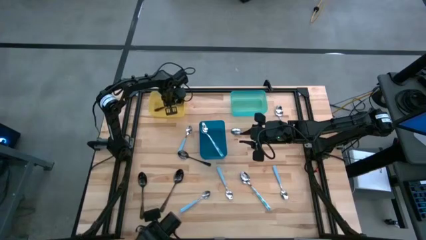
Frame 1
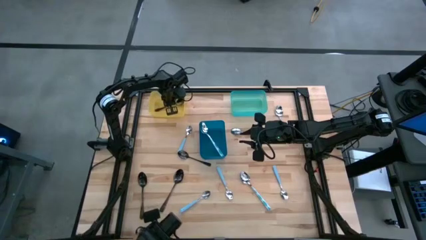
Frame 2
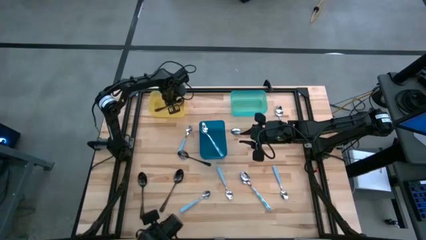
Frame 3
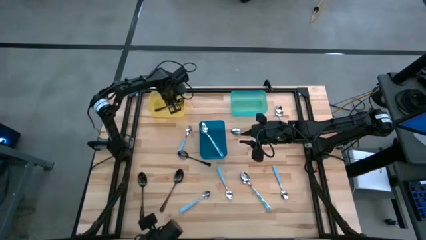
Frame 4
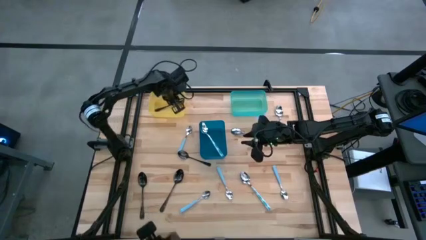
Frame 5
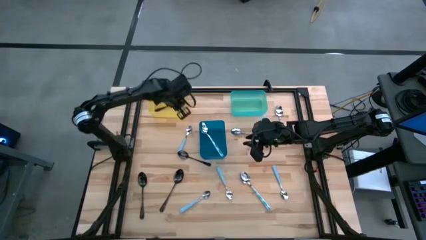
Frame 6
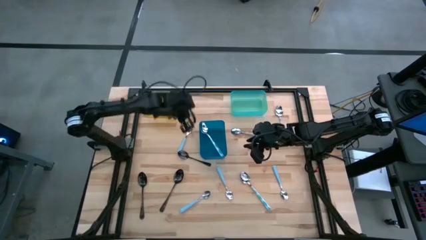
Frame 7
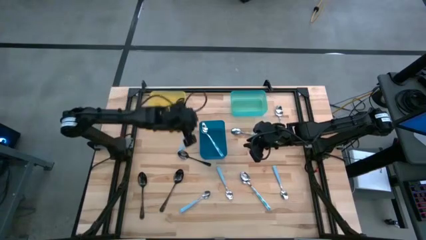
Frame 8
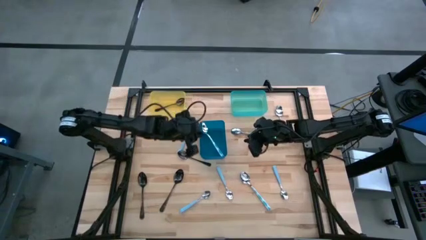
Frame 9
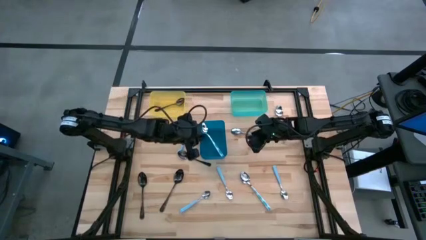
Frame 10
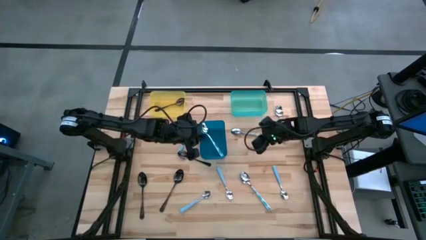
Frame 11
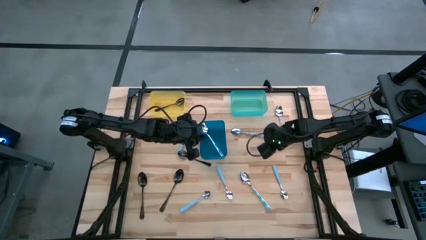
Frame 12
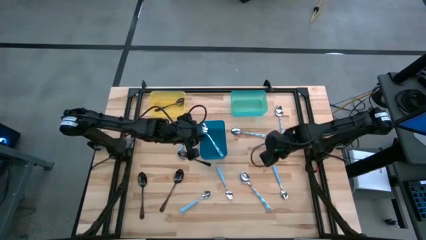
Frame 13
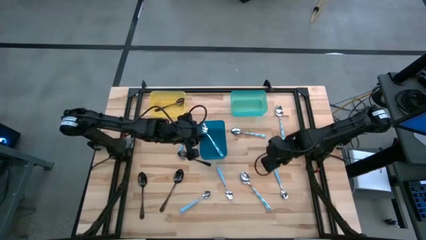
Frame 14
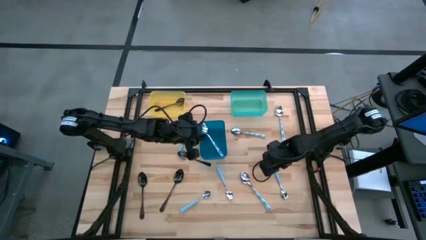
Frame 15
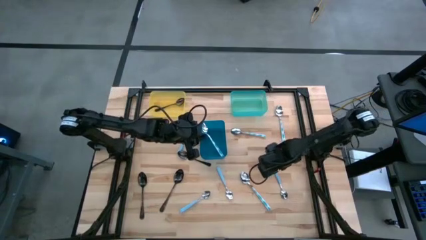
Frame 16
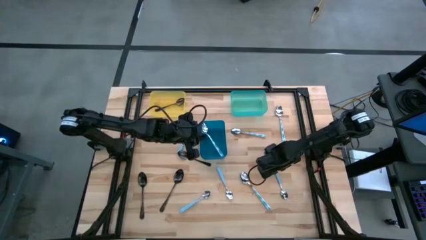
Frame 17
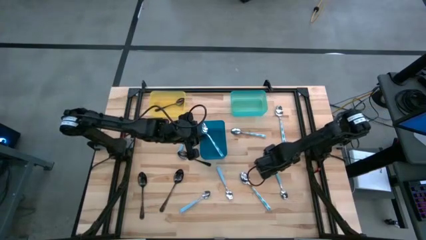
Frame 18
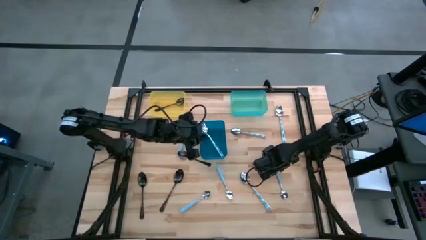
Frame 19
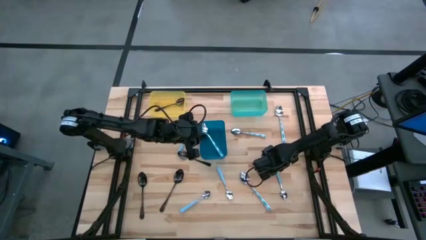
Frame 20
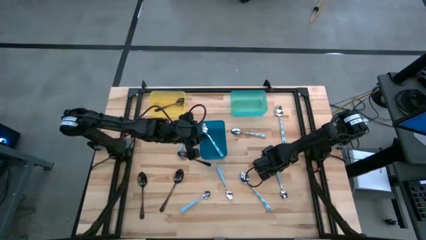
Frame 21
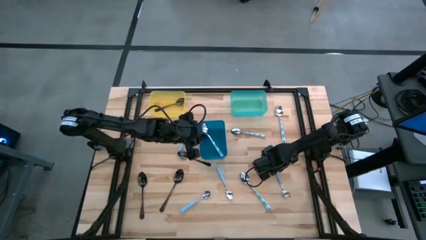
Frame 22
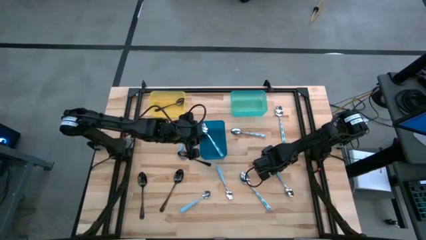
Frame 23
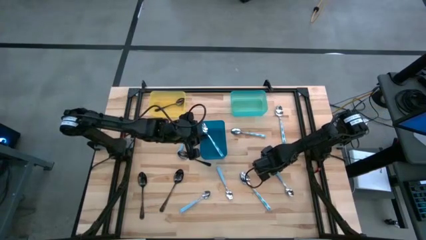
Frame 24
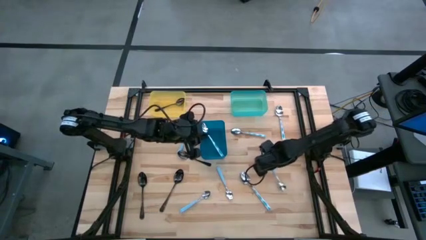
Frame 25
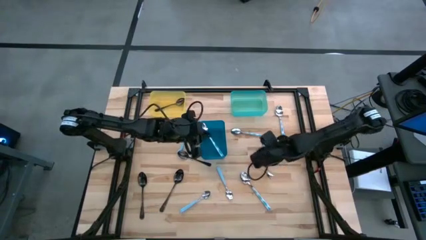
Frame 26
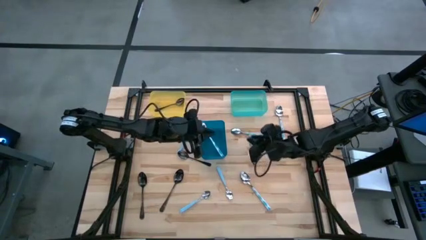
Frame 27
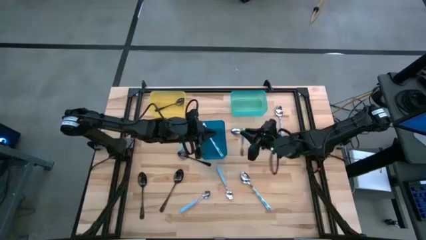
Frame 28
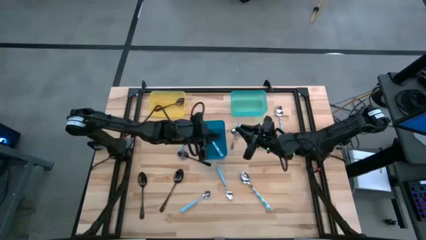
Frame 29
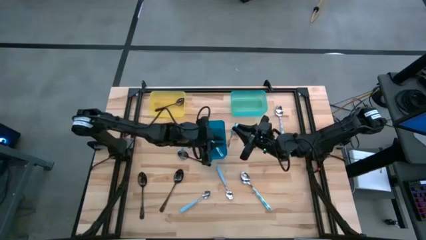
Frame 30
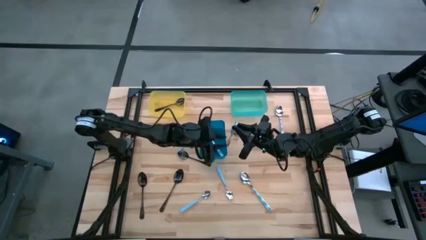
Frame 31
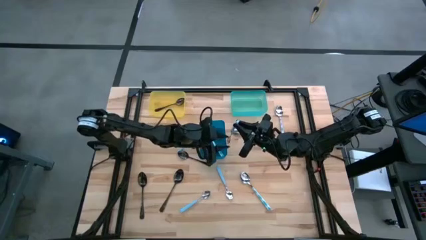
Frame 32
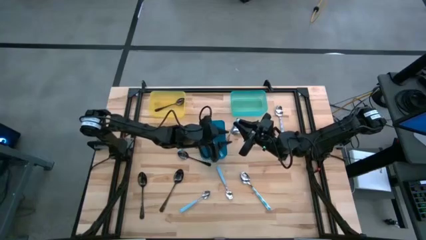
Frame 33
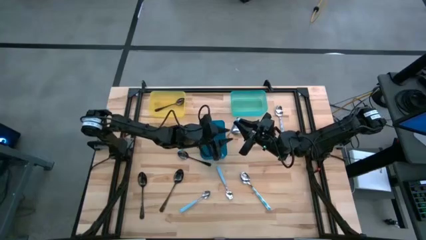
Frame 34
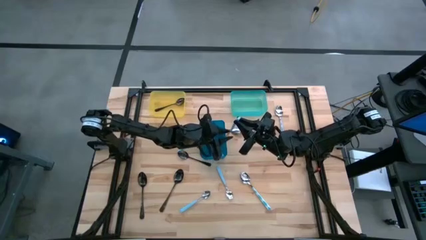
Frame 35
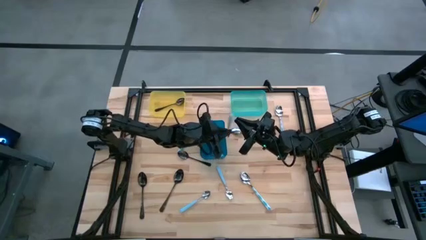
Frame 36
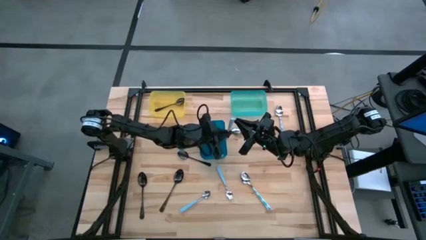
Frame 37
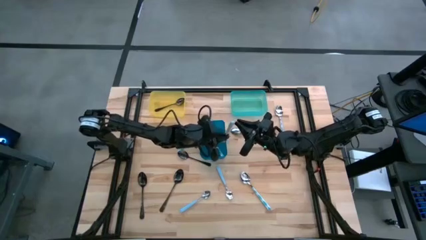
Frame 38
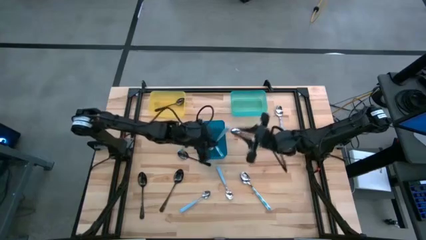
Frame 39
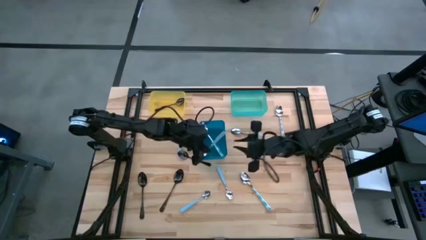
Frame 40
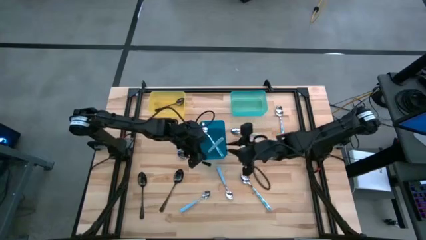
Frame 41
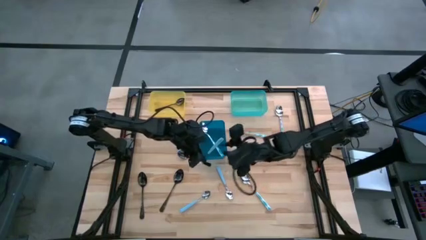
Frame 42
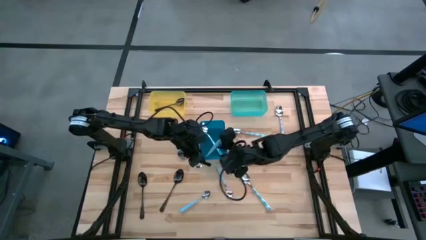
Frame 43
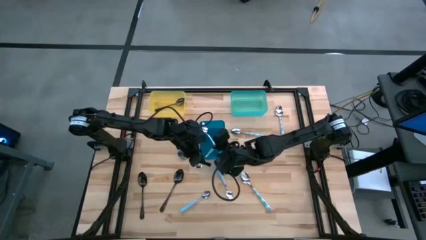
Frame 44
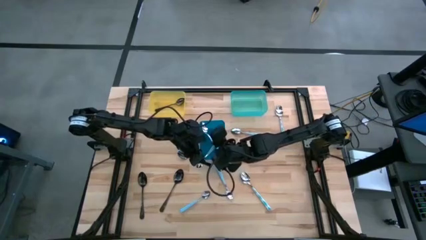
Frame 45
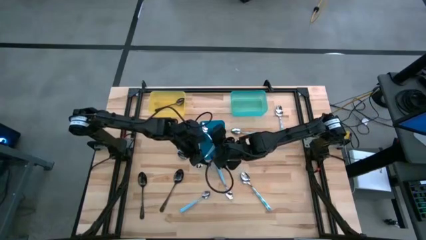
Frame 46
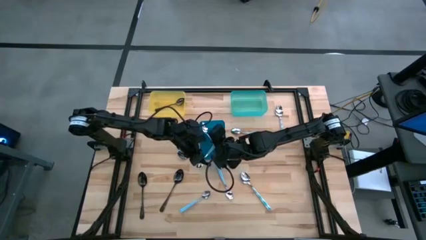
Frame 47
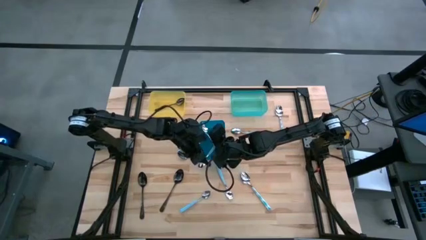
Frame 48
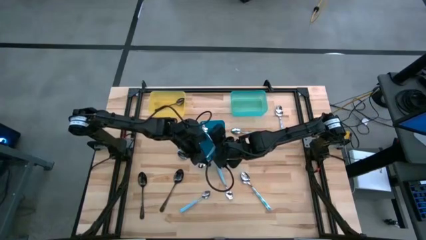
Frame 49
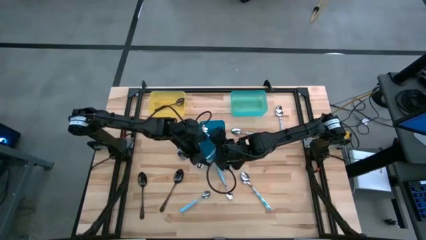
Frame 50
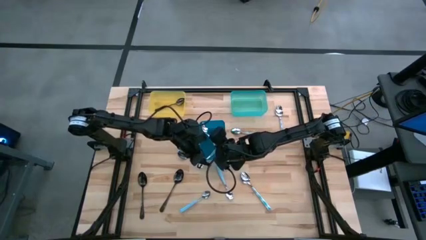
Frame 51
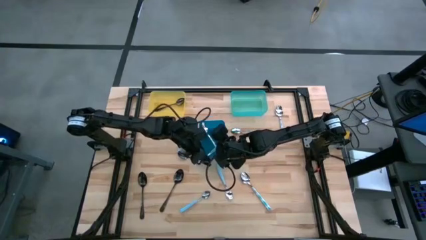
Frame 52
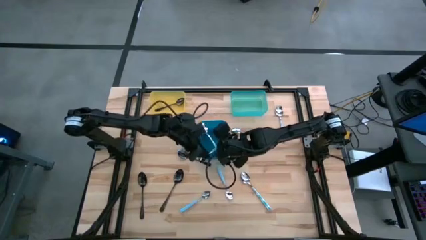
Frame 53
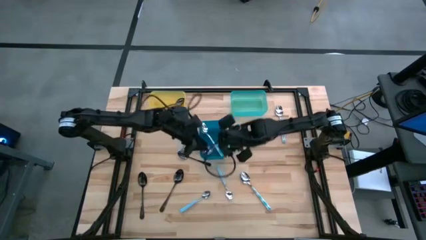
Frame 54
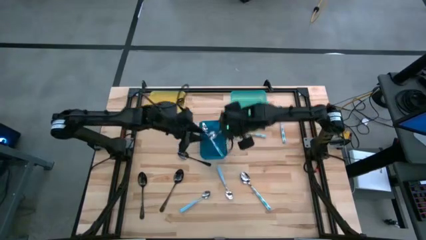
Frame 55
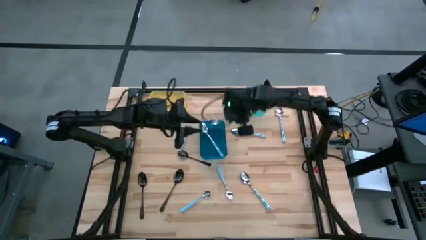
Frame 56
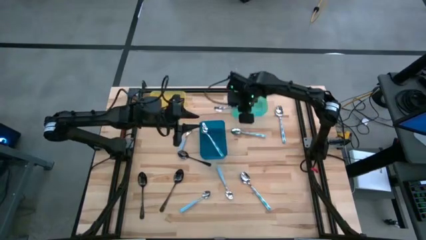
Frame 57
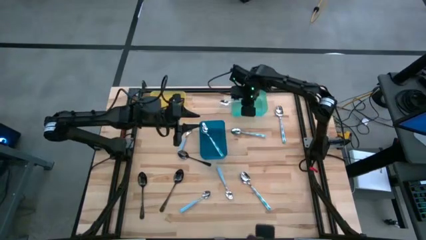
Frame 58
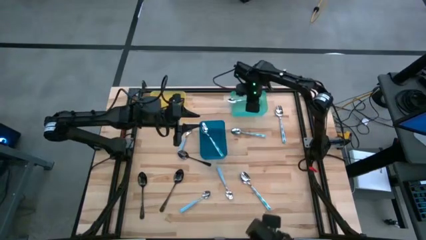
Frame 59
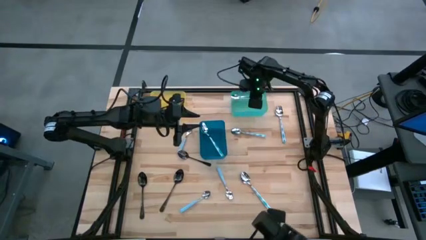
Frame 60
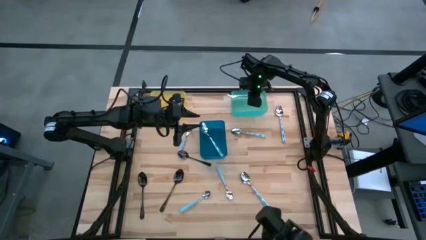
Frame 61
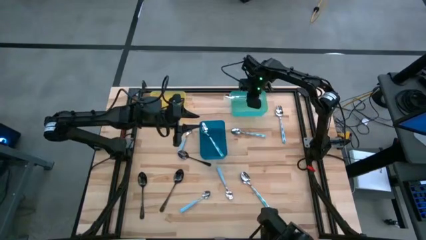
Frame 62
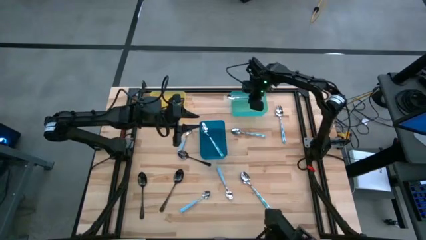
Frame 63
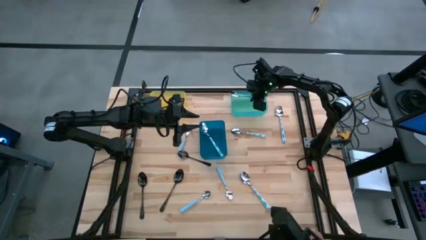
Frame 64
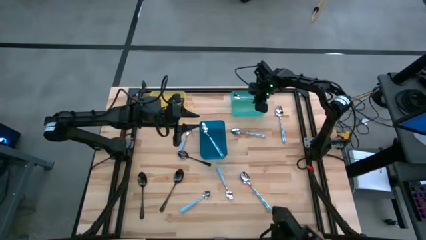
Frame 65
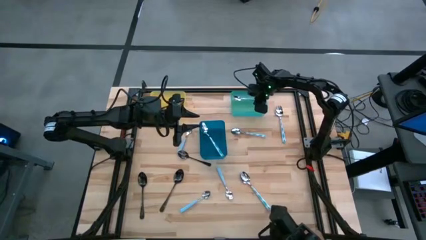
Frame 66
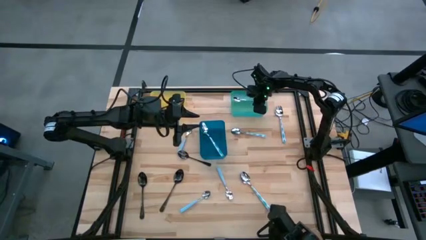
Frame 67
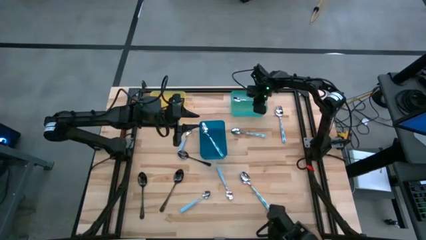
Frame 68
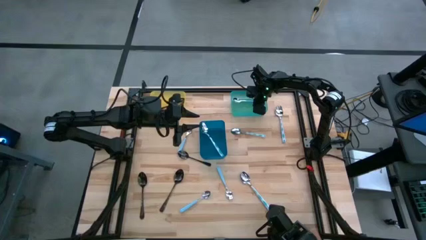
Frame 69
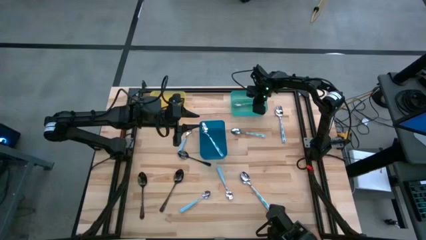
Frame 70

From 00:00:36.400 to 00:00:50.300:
Task: Sort silverware by color (type)
Put the light blue spoon into the light blue bin
